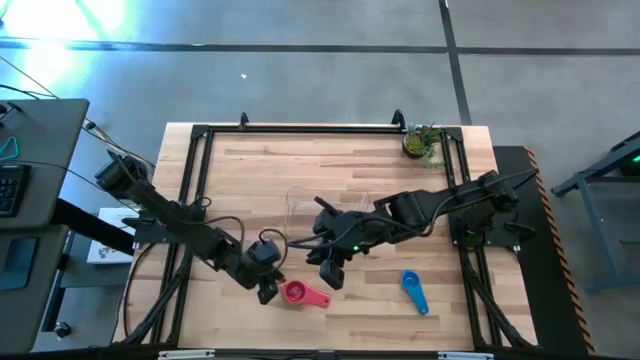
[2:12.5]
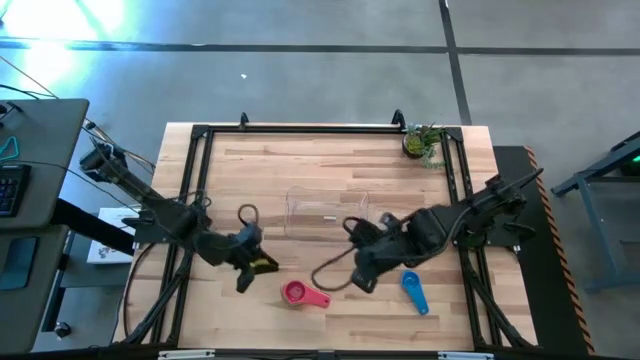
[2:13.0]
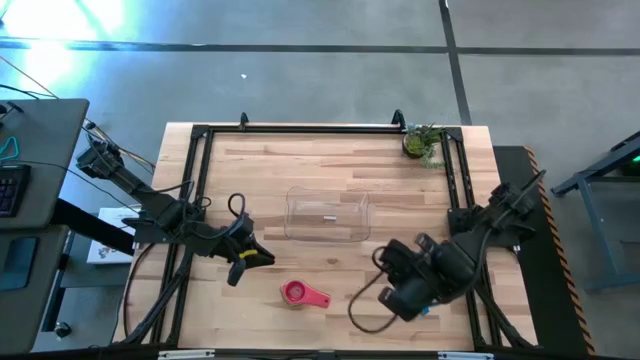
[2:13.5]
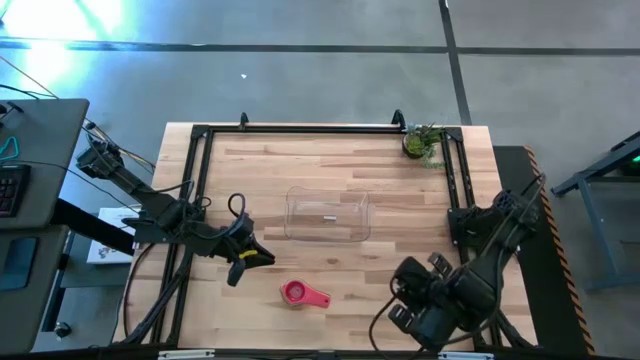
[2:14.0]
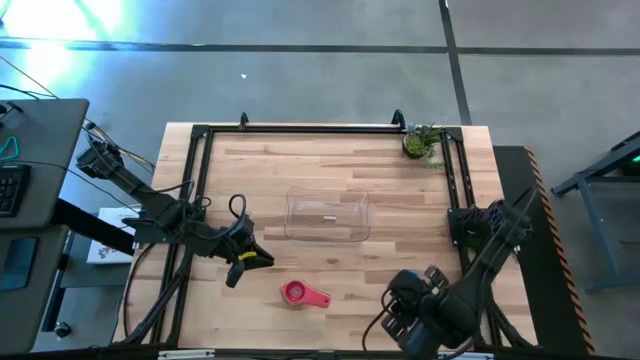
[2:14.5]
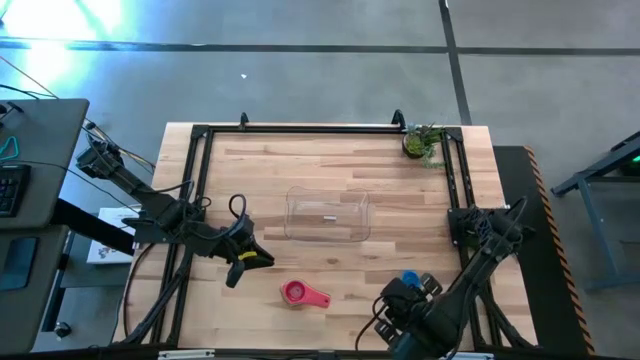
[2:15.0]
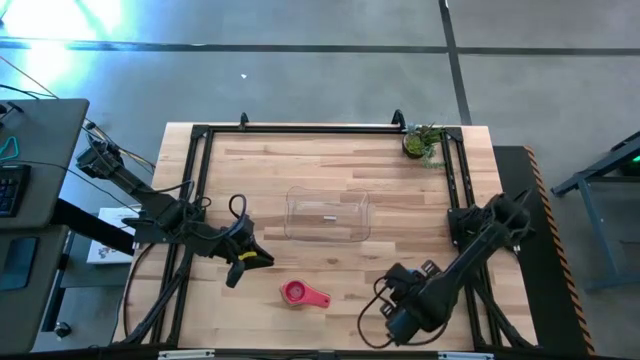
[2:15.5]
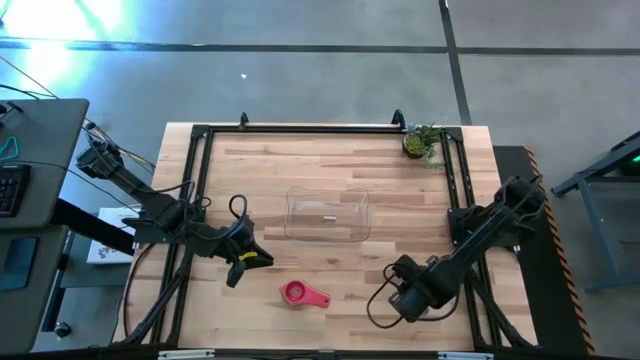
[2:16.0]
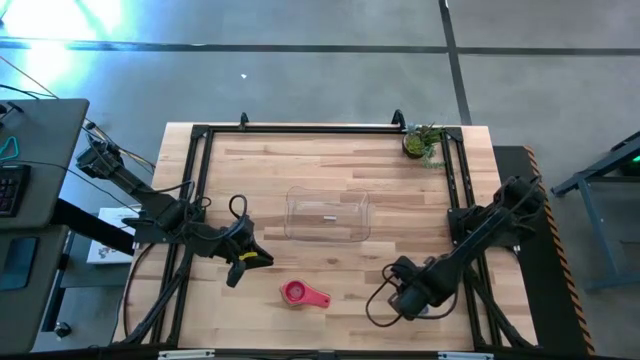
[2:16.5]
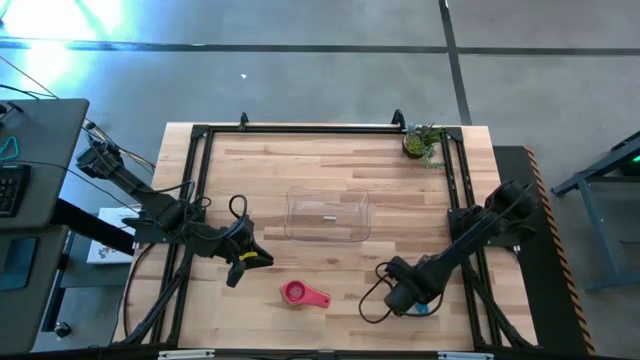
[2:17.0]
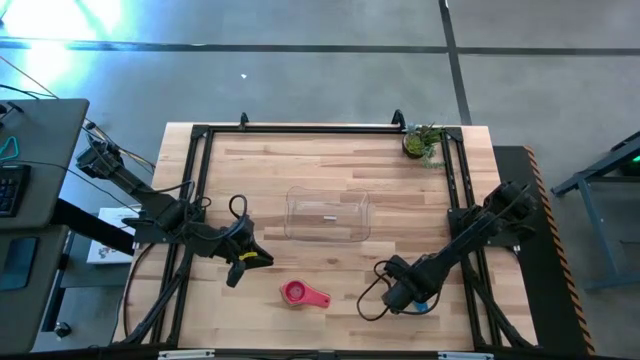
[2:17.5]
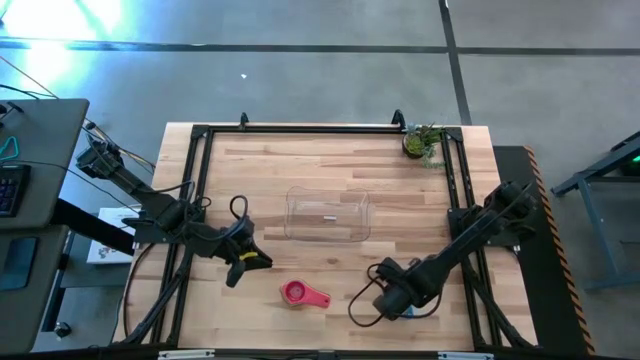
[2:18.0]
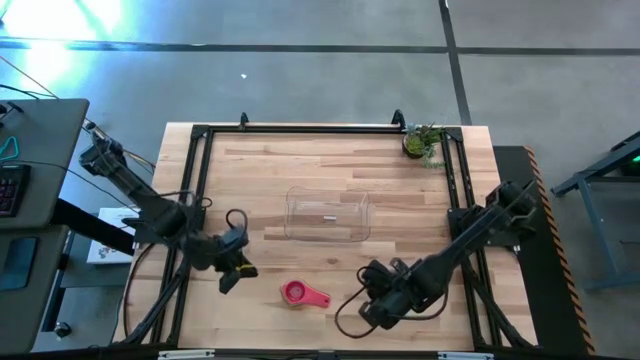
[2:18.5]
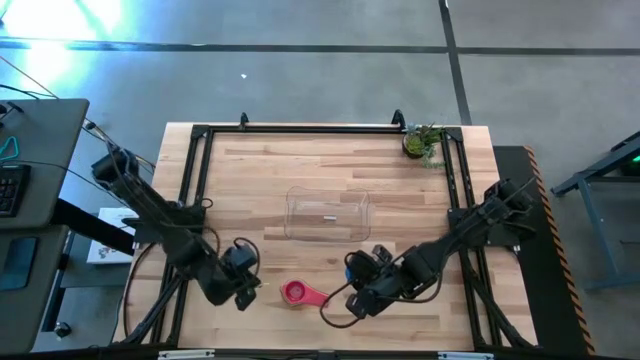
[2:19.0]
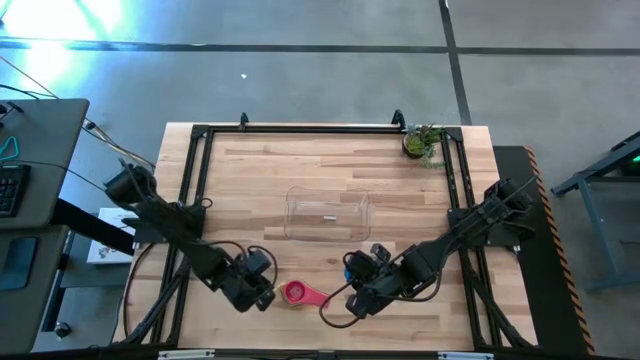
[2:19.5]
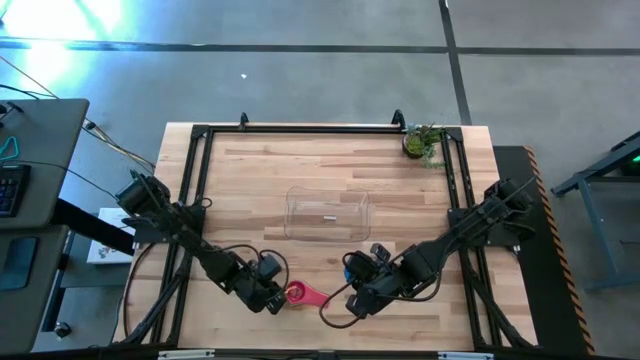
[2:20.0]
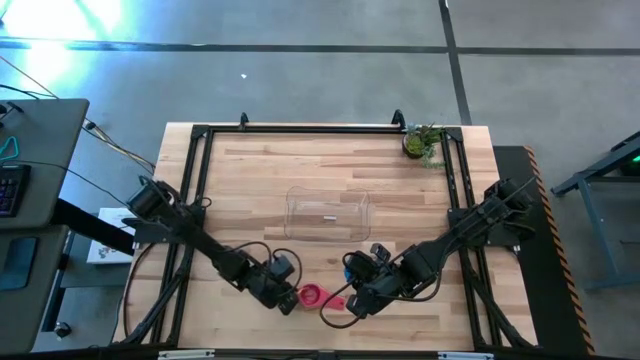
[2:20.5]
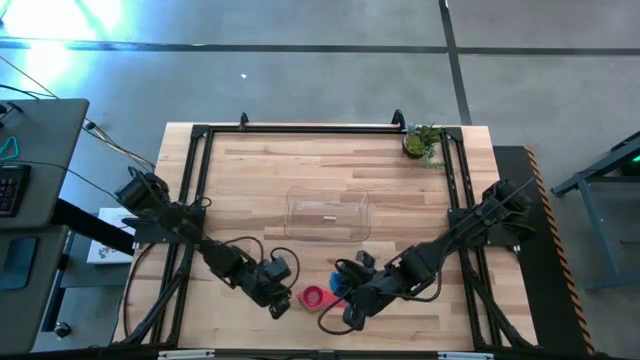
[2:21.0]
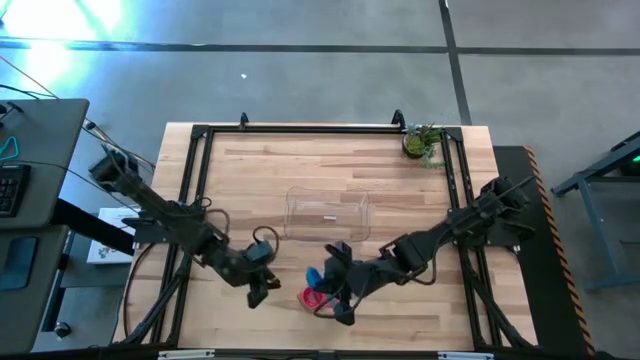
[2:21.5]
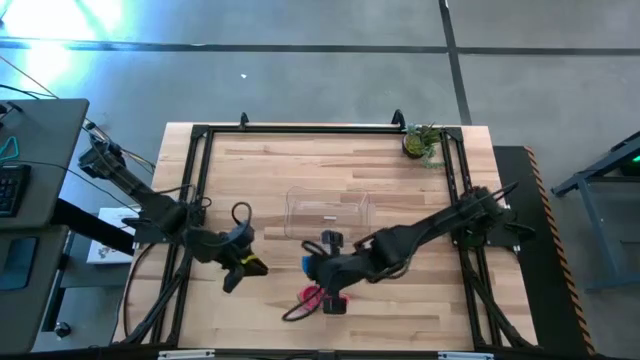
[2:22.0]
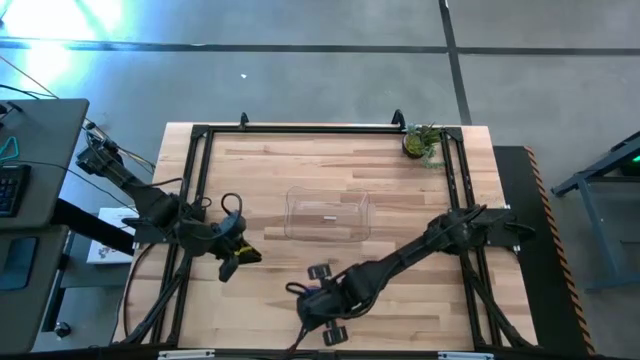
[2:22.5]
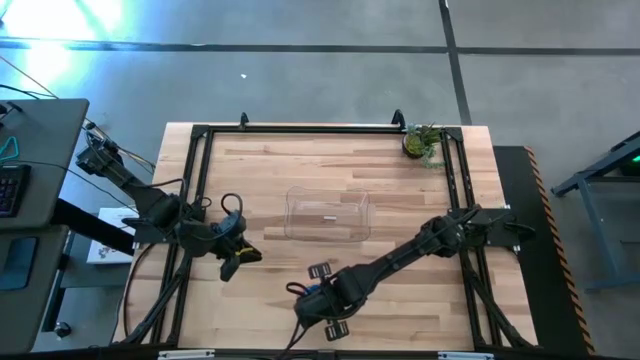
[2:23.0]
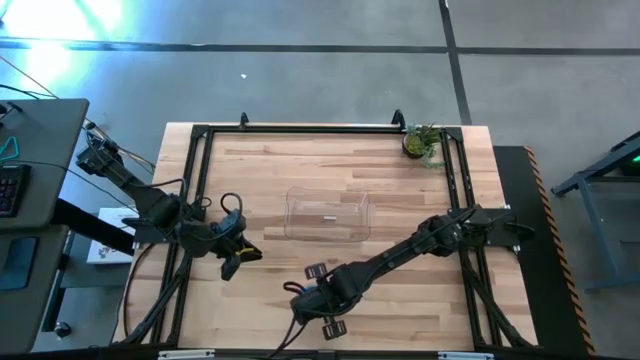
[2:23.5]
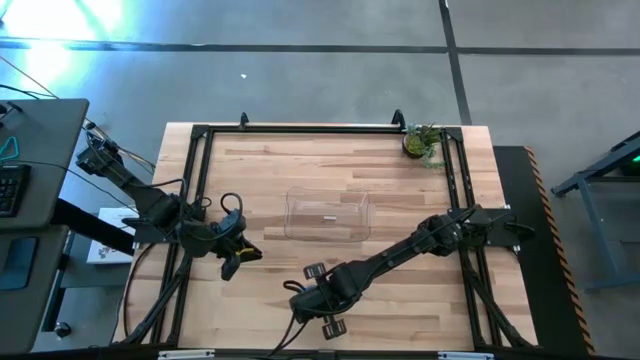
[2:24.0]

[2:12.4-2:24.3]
Task: Nest measuring cups in basket
Stack the blue measuring cup on top of the red measuring cup

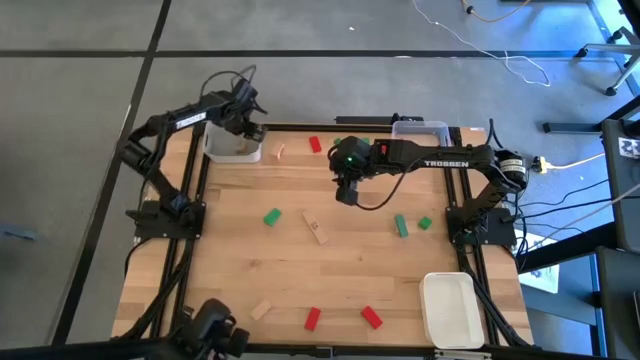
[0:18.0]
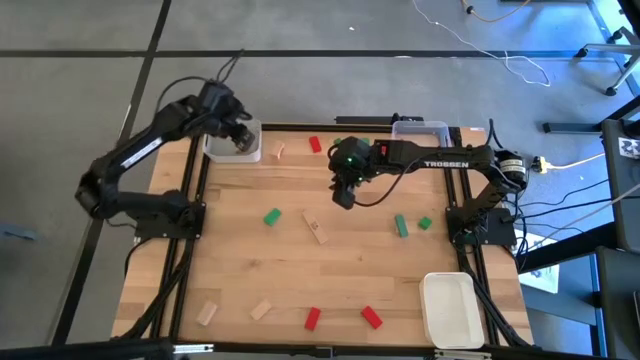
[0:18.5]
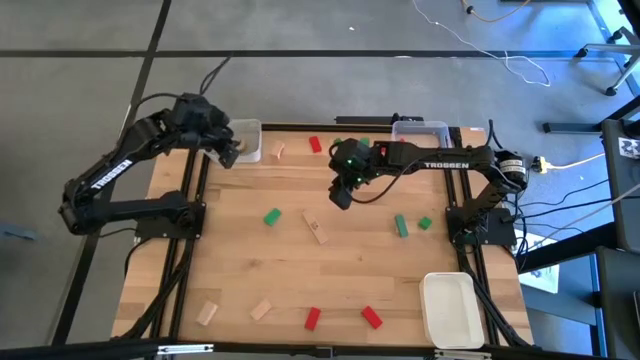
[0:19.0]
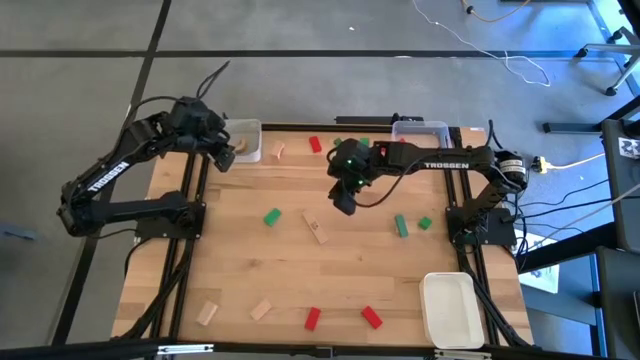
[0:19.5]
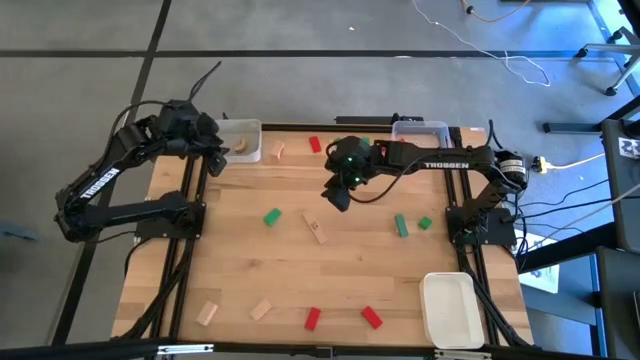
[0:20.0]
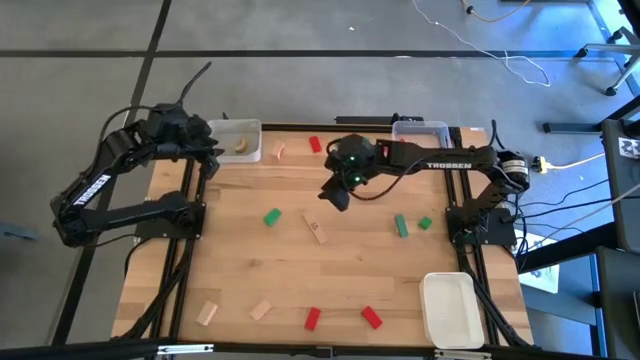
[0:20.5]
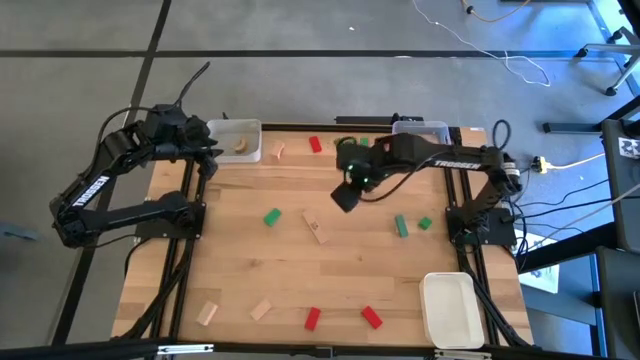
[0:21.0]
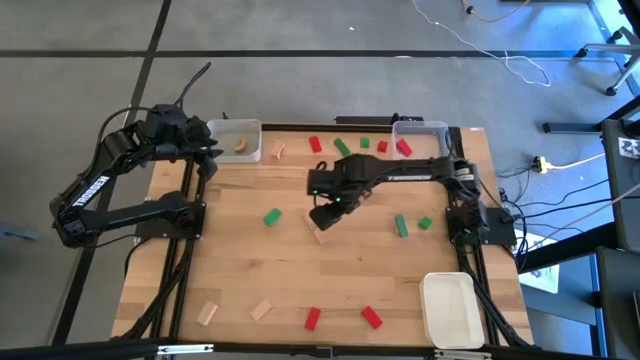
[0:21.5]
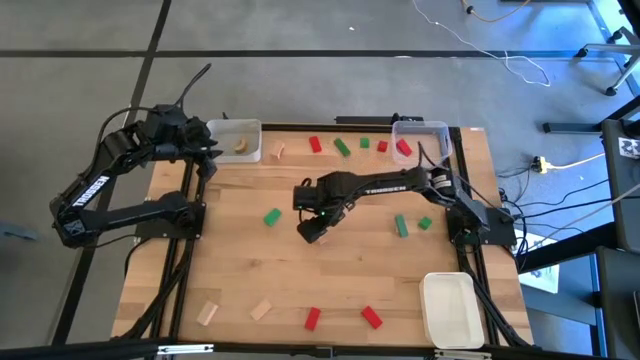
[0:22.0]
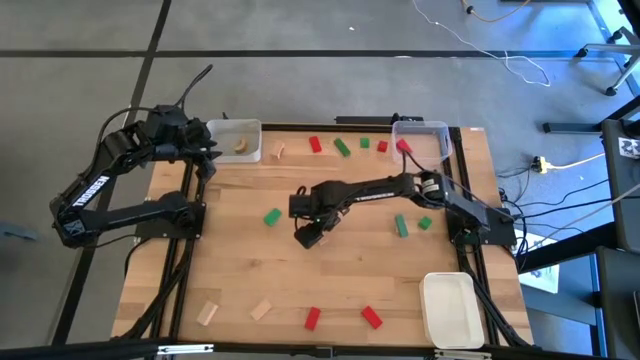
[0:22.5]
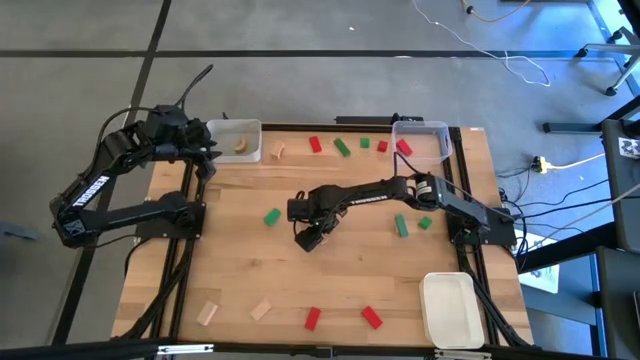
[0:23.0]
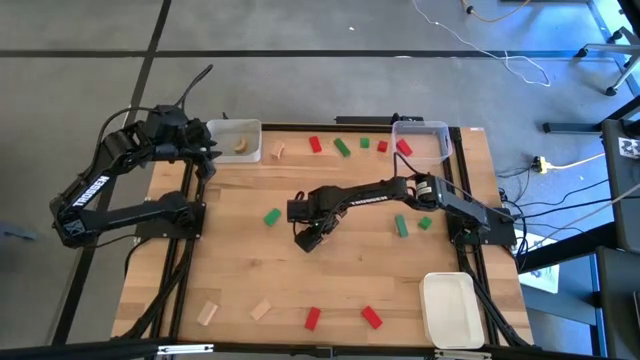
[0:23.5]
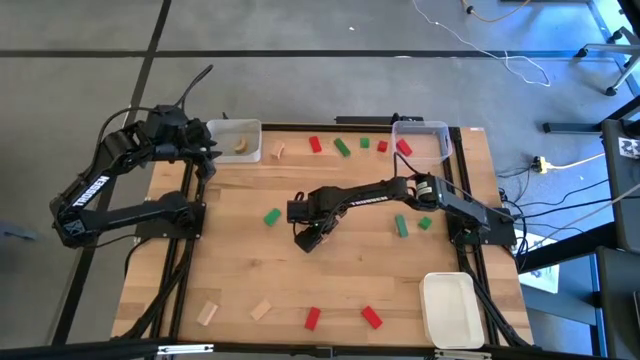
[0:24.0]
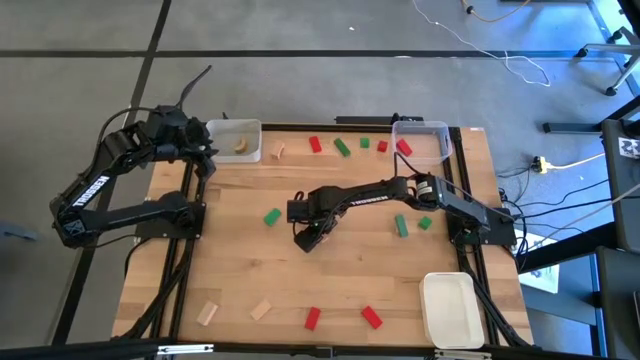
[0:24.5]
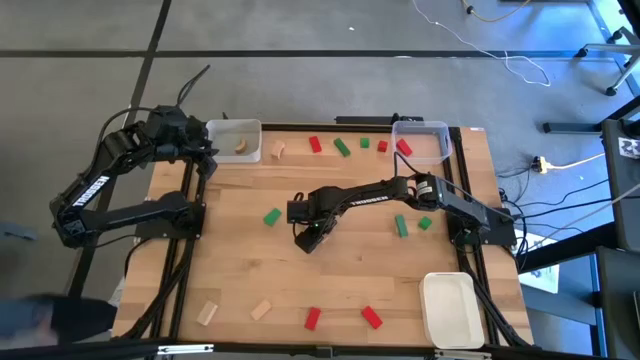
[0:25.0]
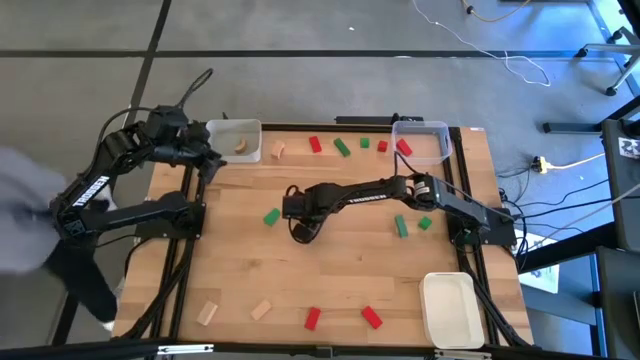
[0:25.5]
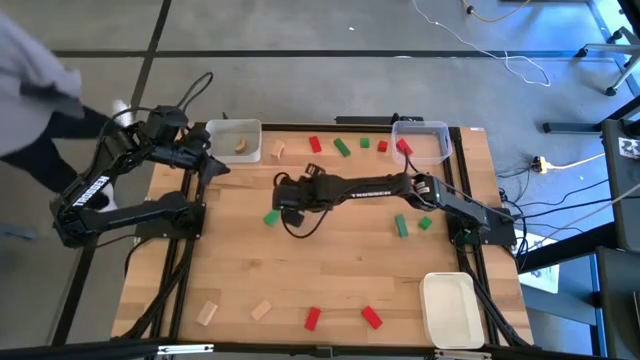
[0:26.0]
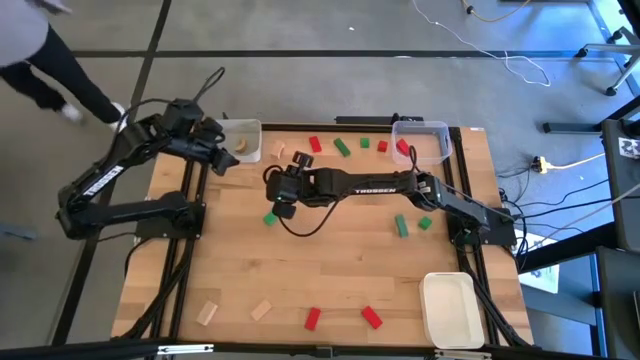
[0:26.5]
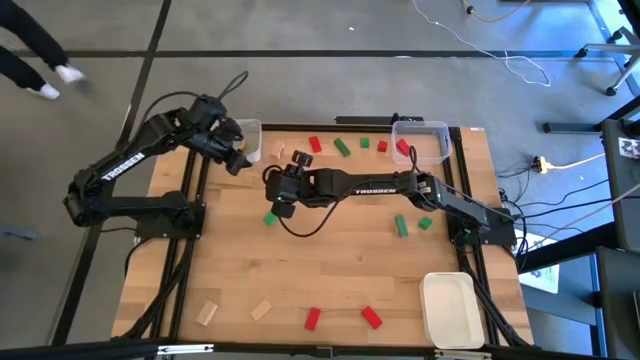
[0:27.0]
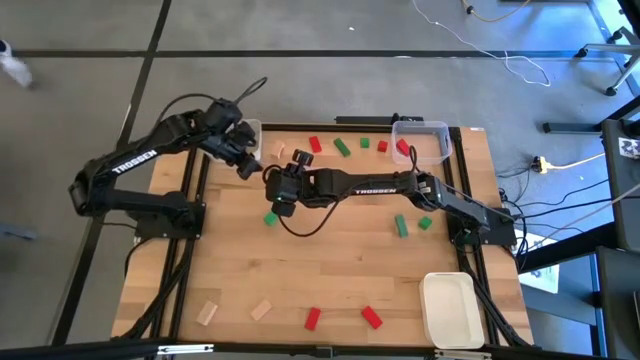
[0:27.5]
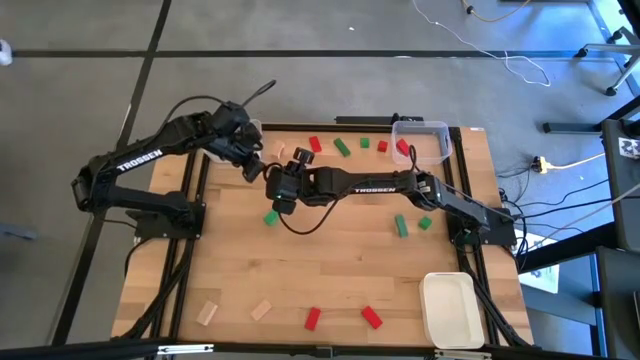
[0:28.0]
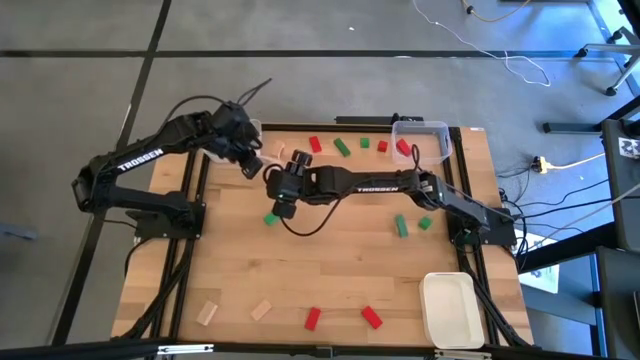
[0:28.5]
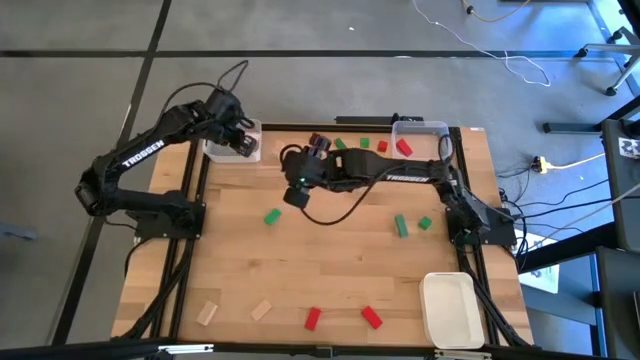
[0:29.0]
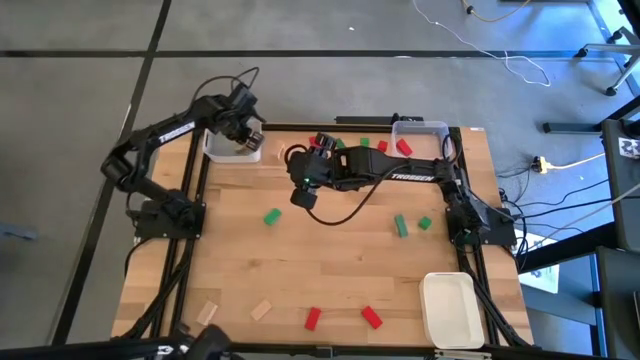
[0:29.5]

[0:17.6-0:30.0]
Task: Sort & place blocks by color
Put the light brown block into the gray bin
